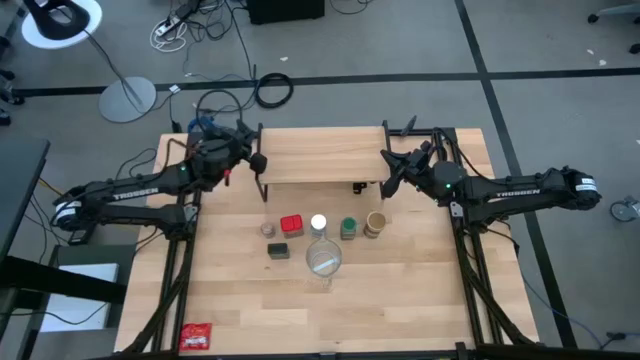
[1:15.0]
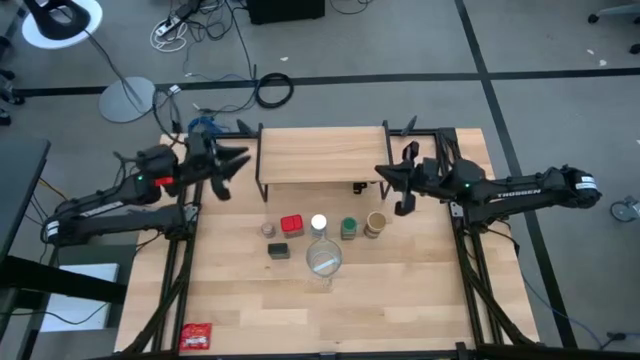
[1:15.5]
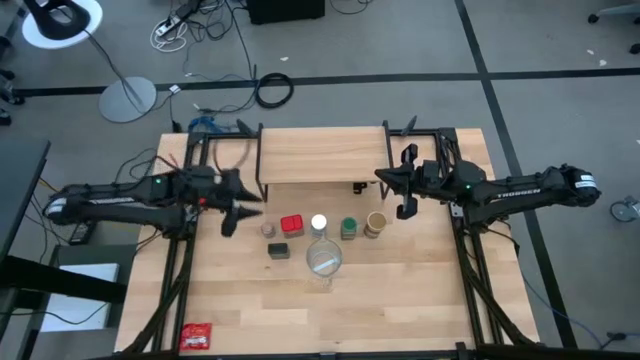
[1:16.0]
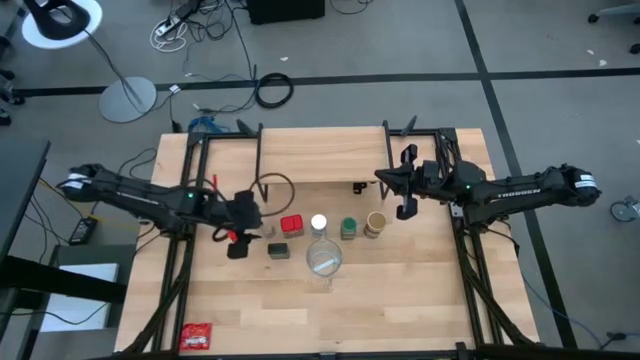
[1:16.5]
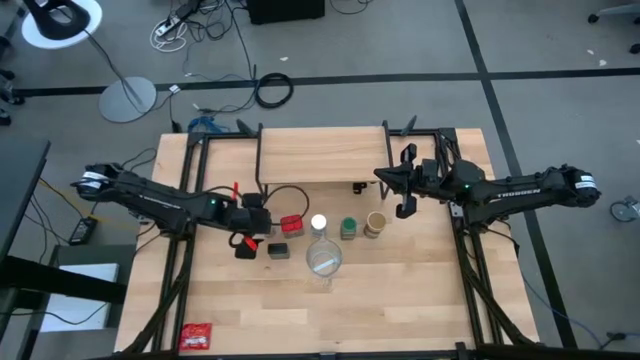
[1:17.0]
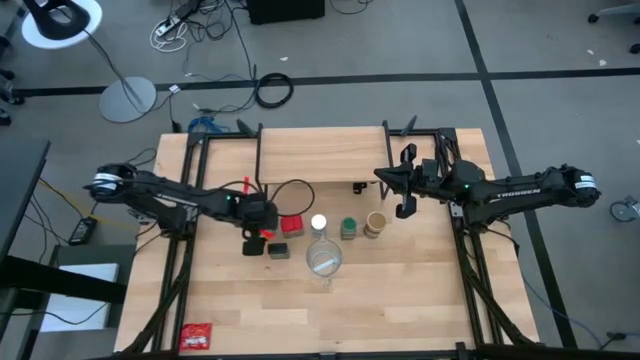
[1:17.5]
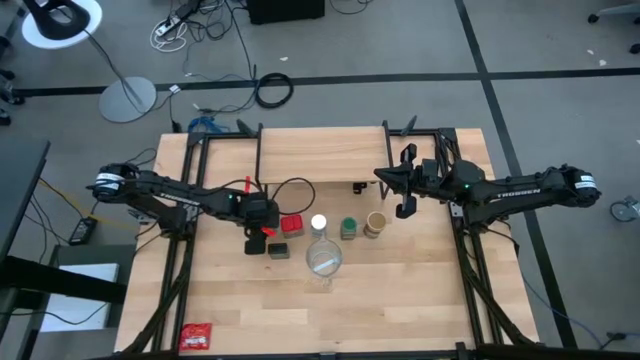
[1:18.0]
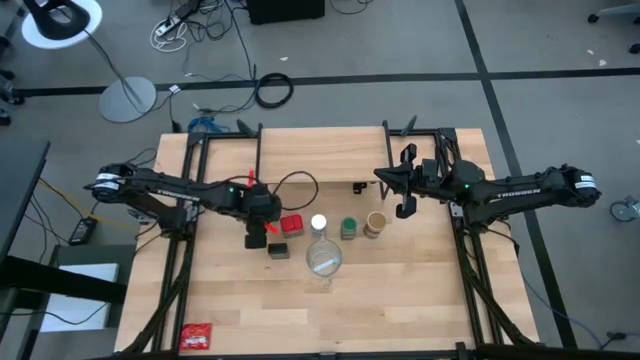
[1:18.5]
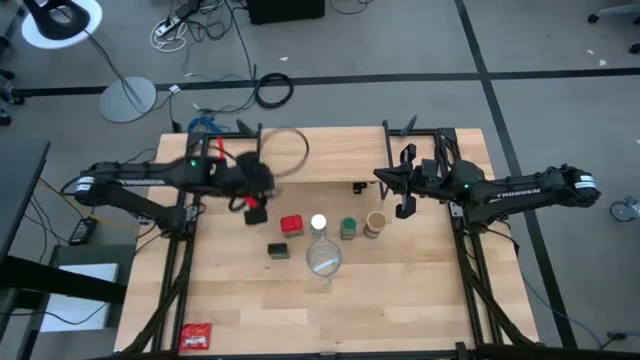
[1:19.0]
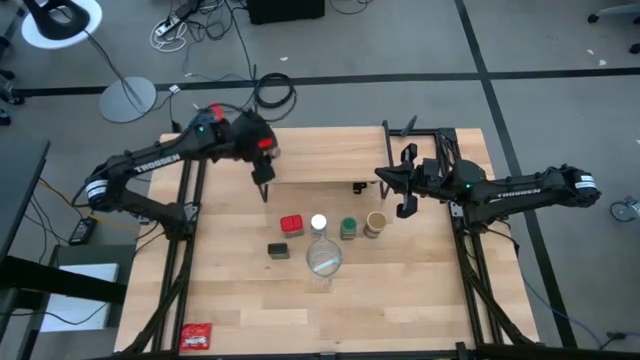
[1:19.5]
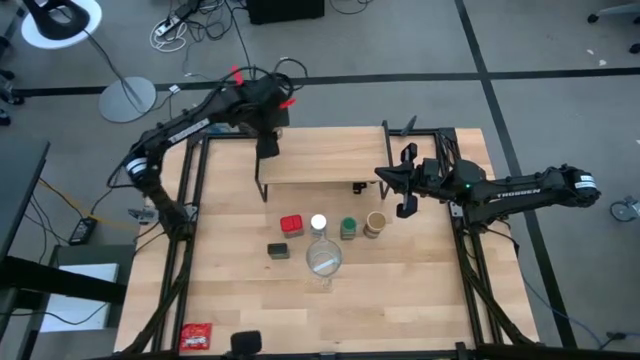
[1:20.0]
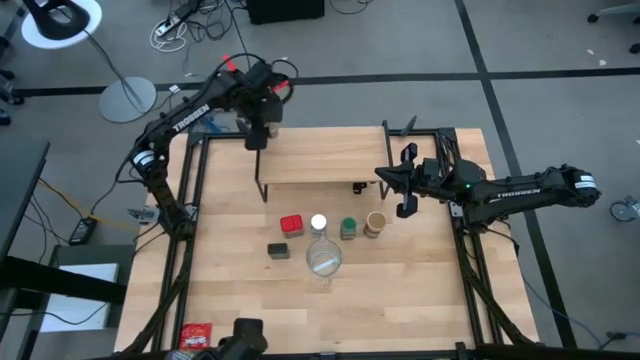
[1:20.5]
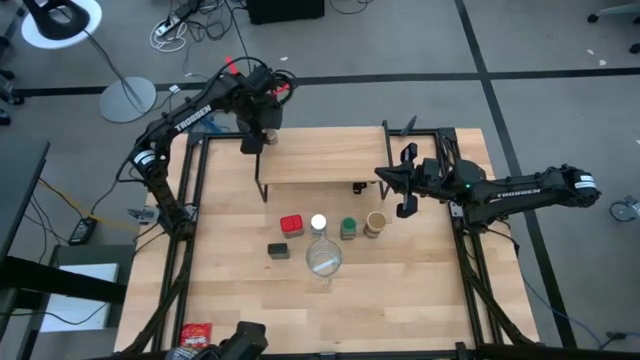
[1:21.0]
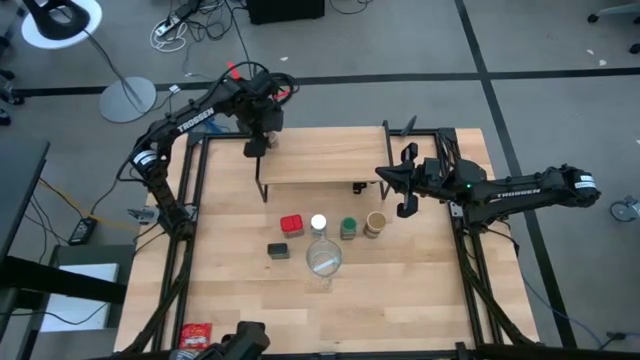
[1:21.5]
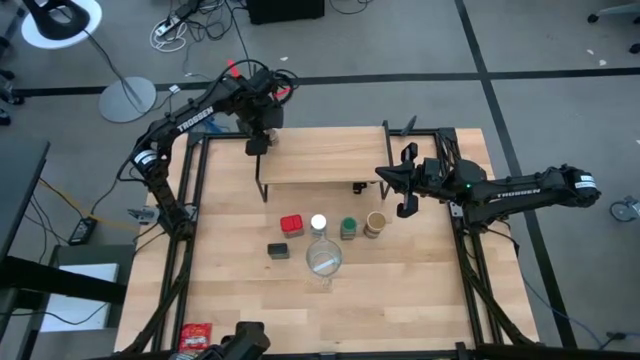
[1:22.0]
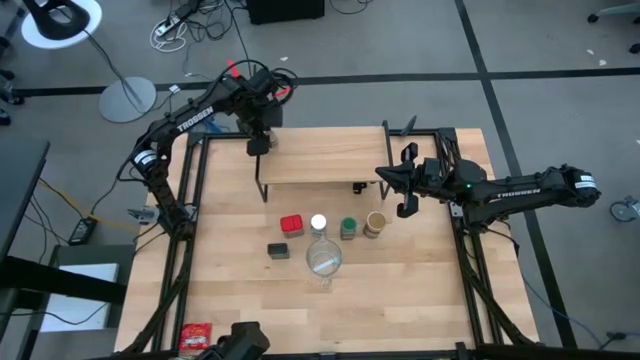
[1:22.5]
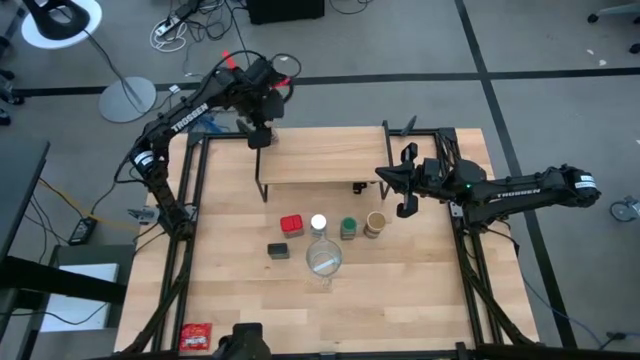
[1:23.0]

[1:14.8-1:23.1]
Task: Shelf spices
Put the transparent seasoning bottle on the shelf

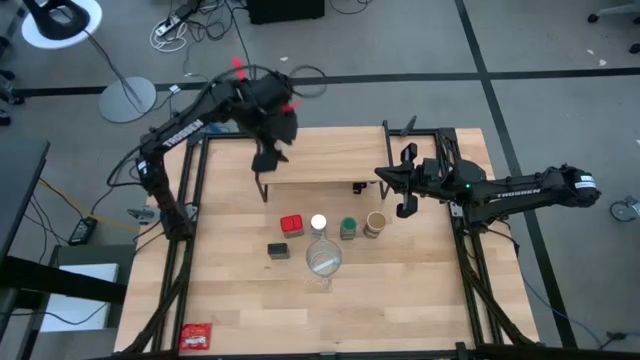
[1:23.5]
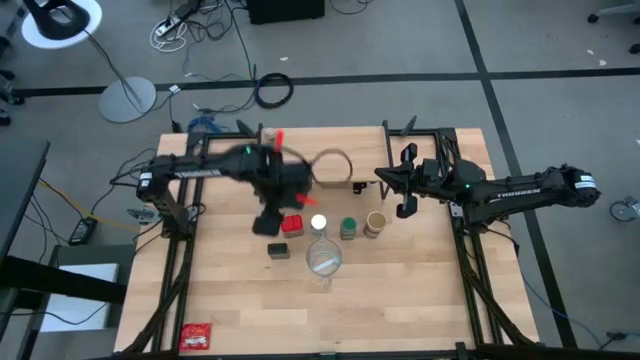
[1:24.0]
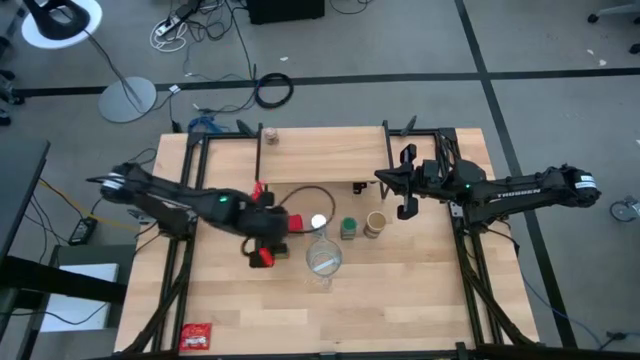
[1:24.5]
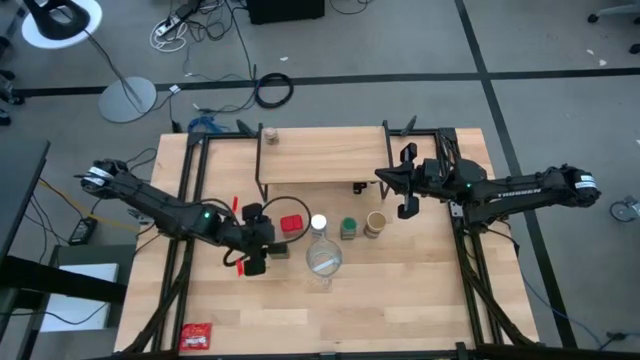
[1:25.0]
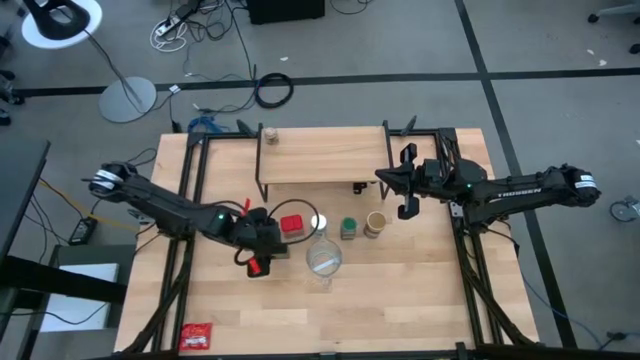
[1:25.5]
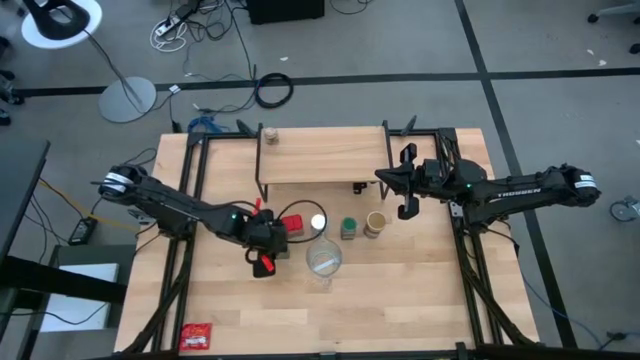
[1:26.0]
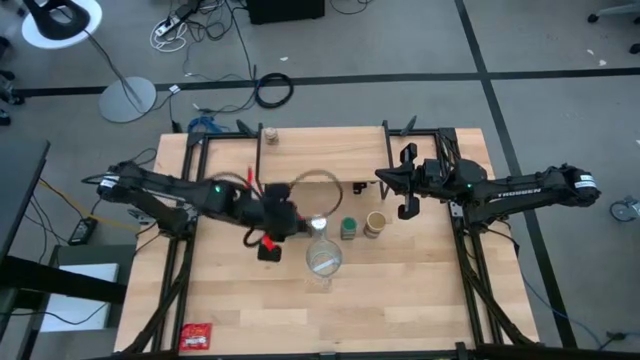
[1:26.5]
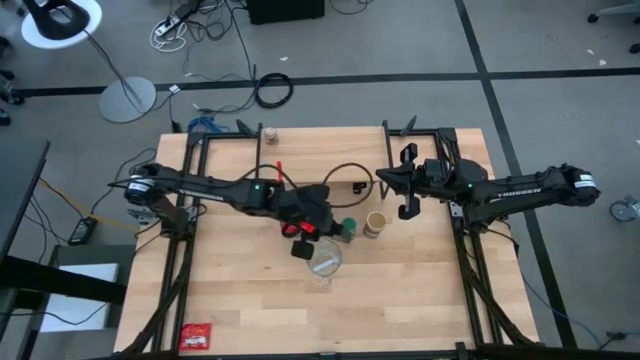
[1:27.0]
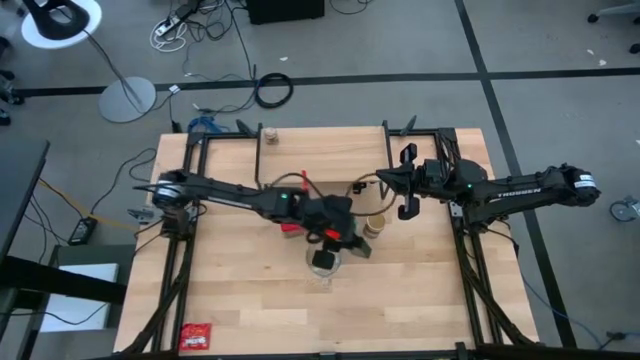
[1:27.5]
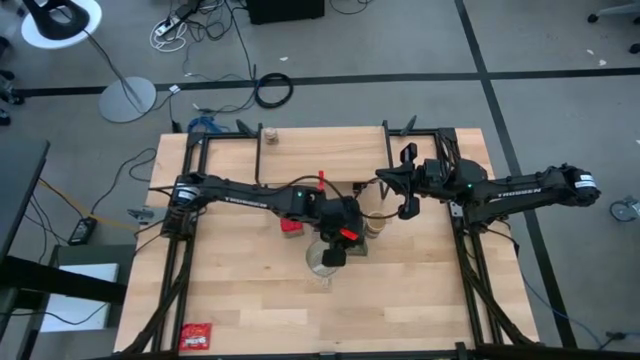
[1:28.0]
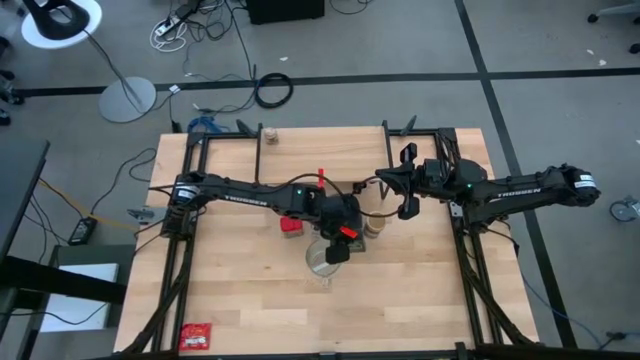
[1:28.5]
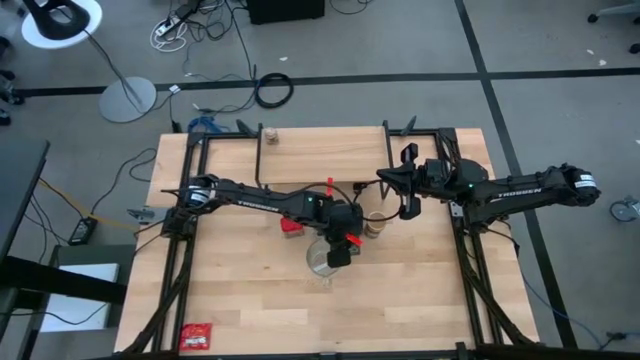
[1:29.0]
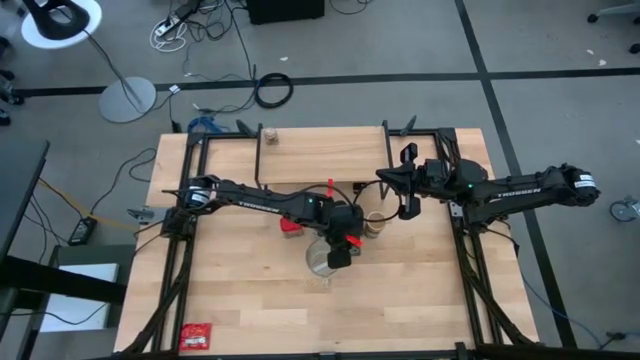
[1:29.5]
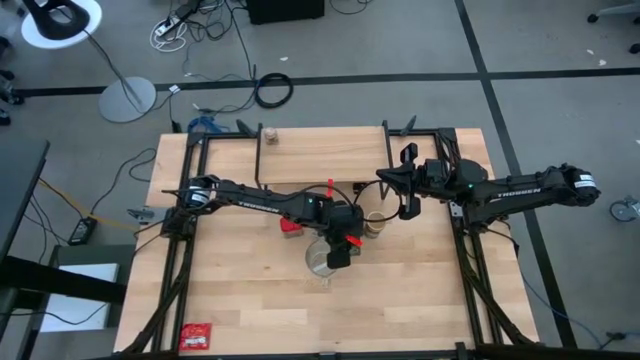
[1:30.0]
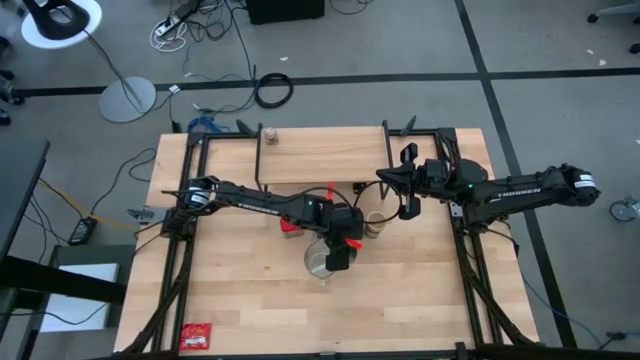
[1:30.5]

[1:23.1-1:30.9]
Move the black seasoning can to the center of the table

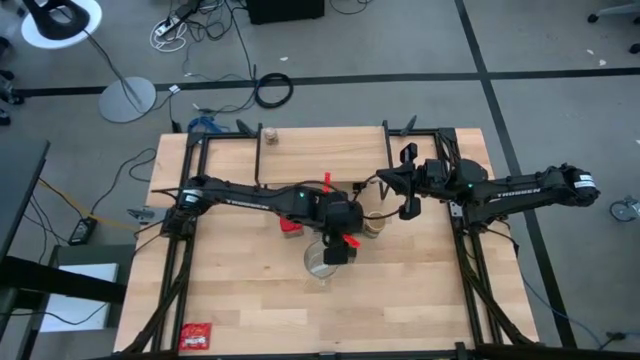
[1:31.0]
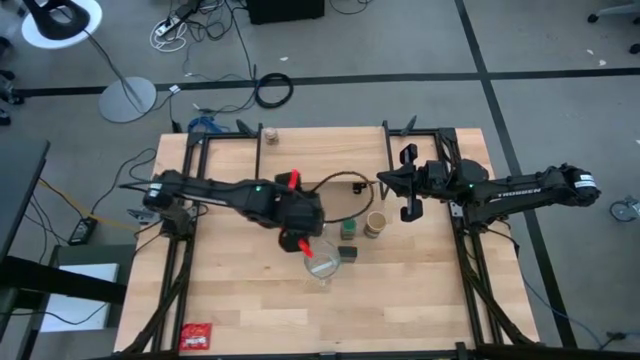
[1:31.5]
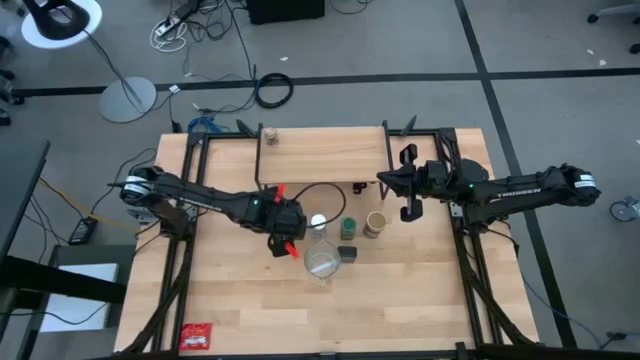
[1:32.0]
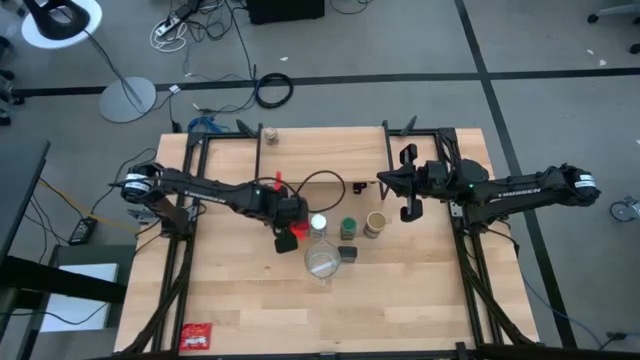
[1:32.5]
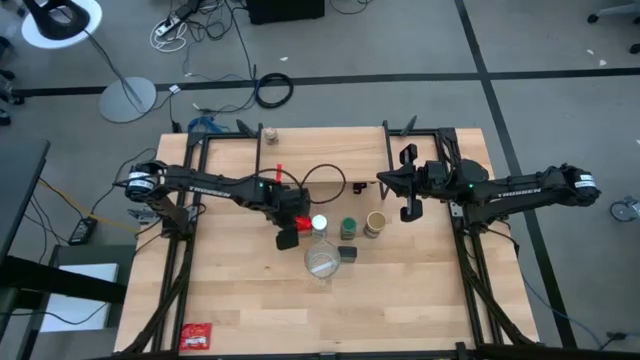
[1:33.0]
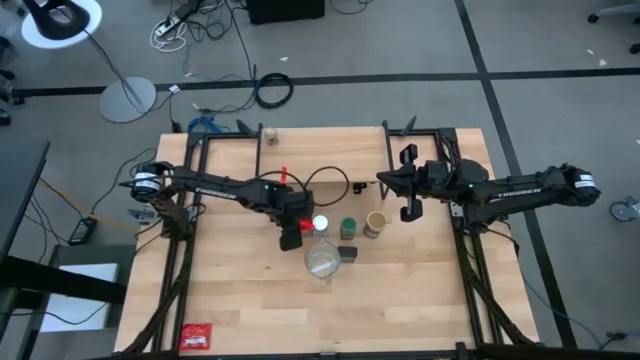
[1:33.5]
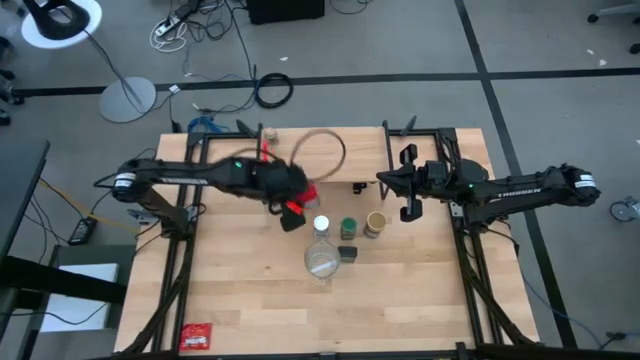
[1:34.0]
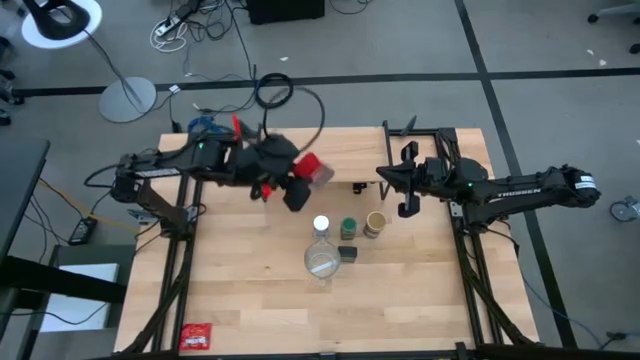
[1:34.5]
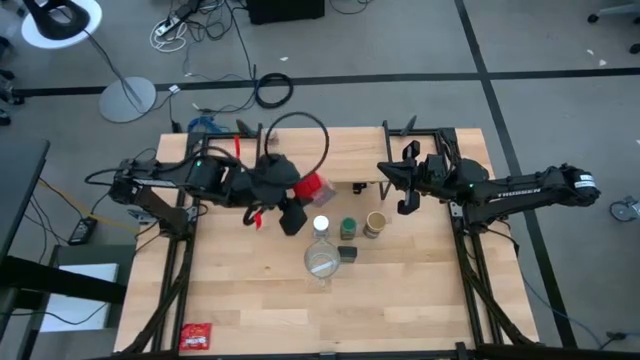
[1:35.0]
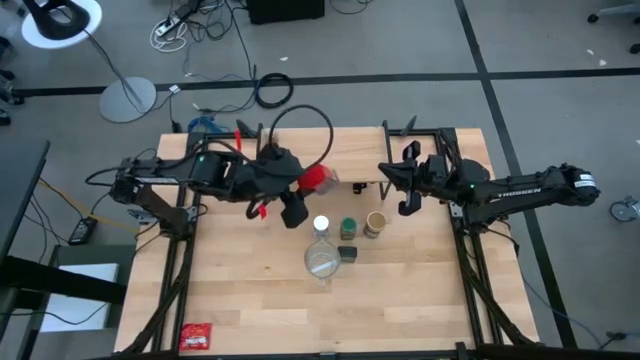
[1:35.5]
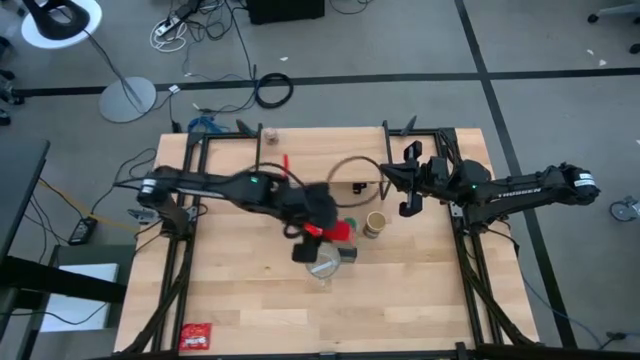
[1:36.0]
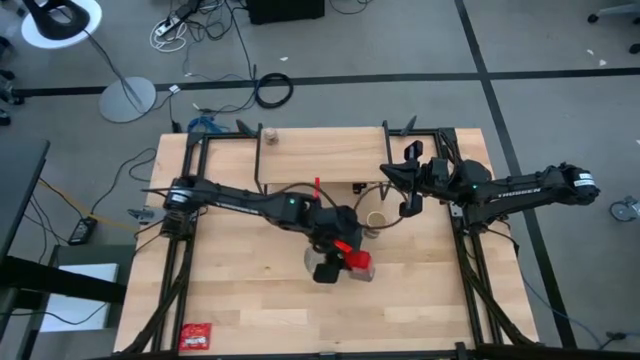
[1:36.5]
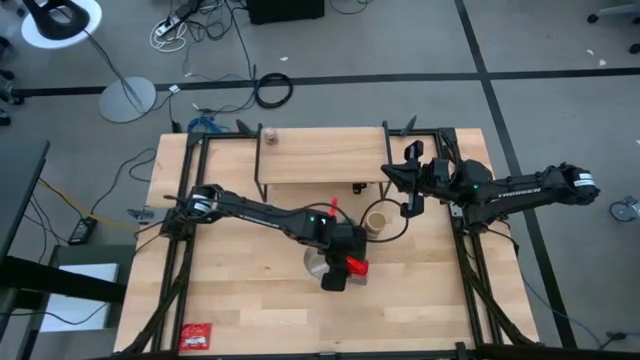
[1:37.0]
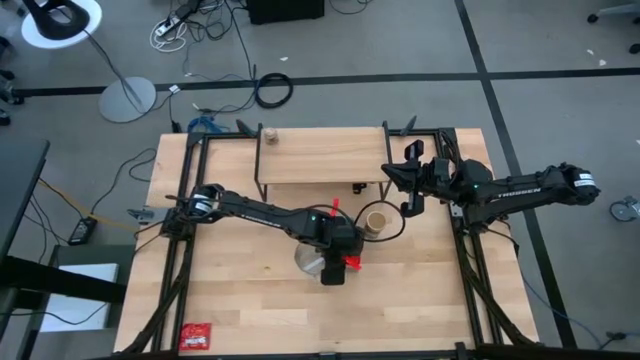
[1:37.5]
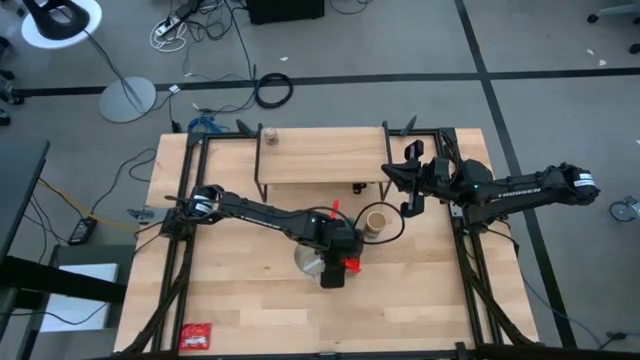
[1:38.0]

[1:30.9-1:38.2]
Move the red seasoning can to the center of the table
